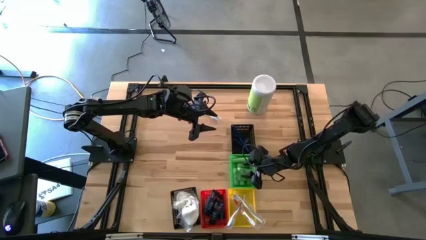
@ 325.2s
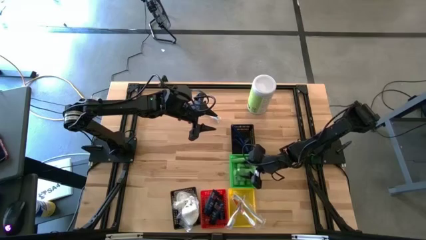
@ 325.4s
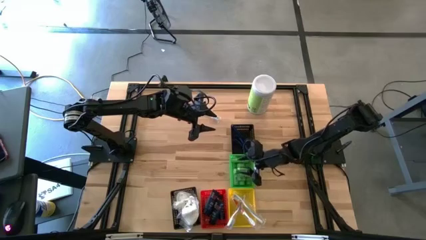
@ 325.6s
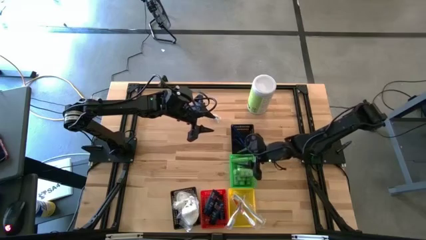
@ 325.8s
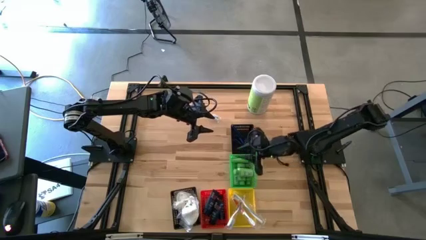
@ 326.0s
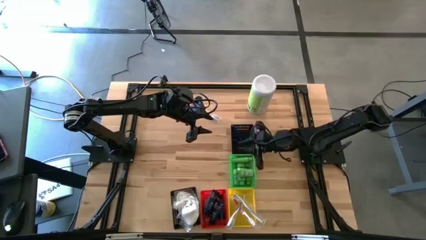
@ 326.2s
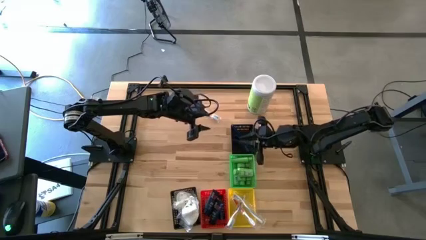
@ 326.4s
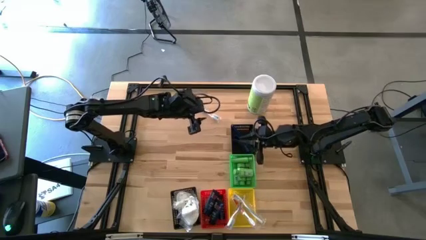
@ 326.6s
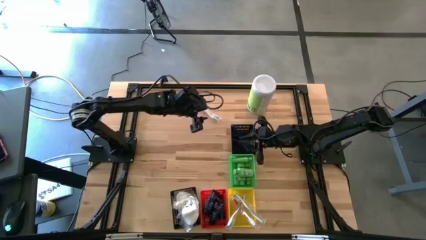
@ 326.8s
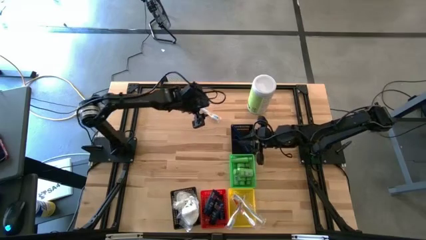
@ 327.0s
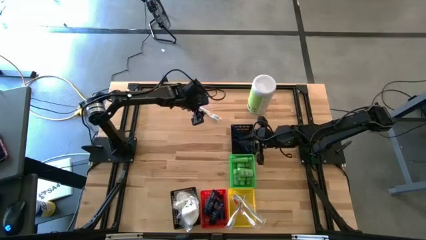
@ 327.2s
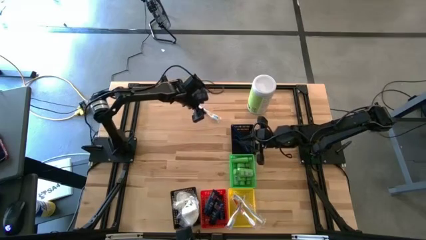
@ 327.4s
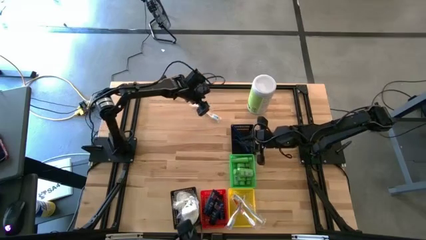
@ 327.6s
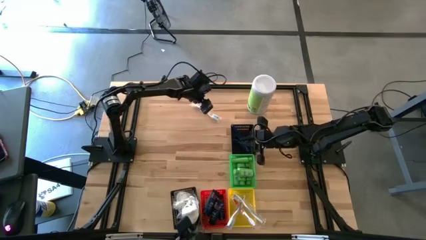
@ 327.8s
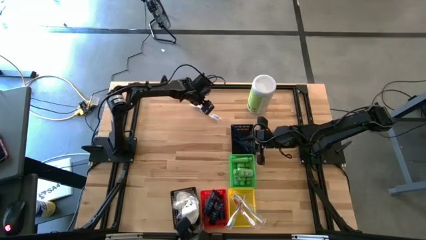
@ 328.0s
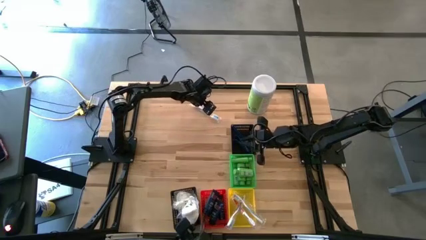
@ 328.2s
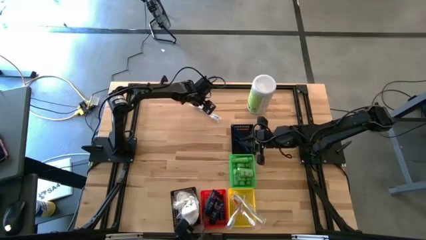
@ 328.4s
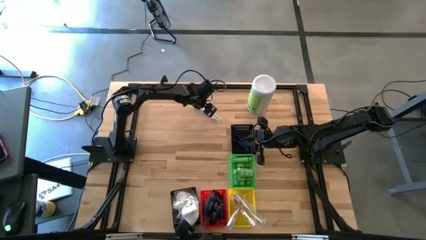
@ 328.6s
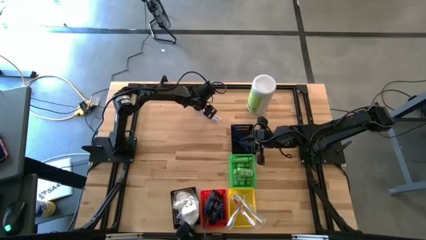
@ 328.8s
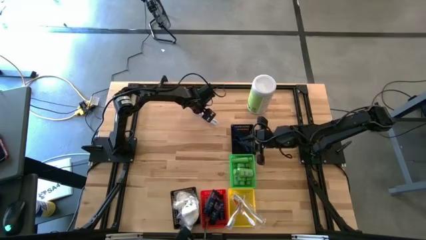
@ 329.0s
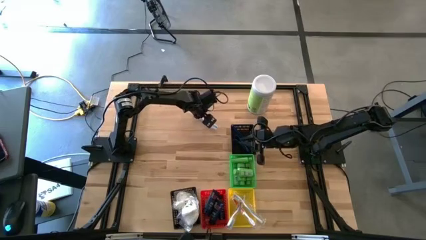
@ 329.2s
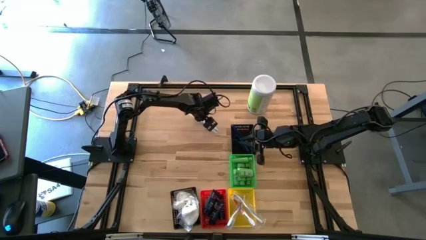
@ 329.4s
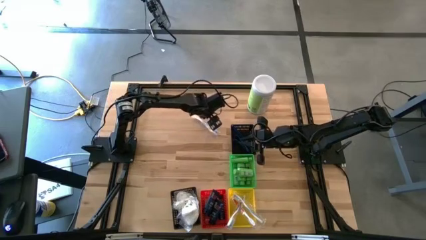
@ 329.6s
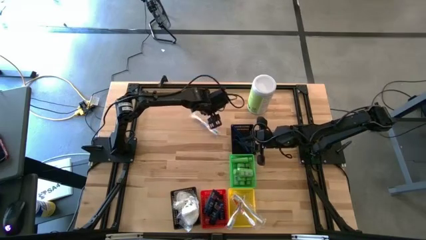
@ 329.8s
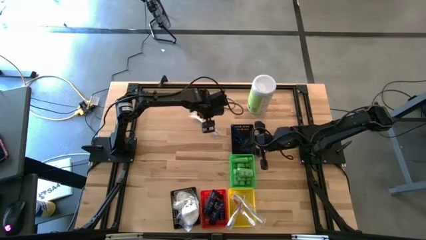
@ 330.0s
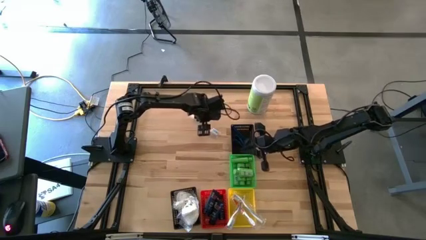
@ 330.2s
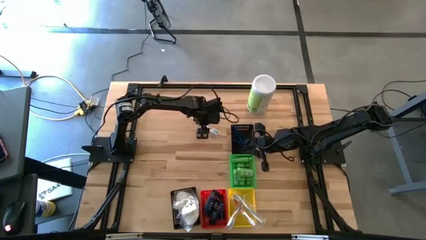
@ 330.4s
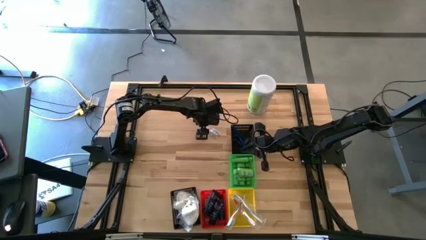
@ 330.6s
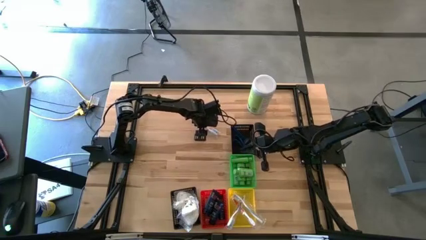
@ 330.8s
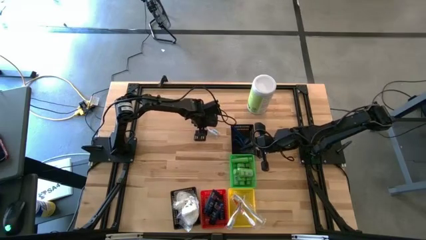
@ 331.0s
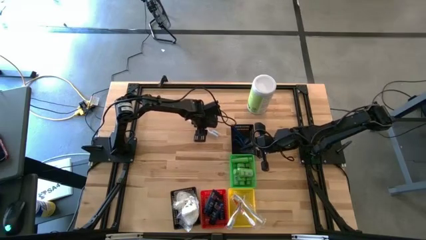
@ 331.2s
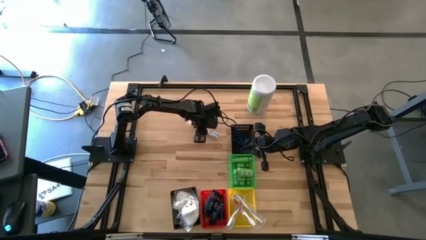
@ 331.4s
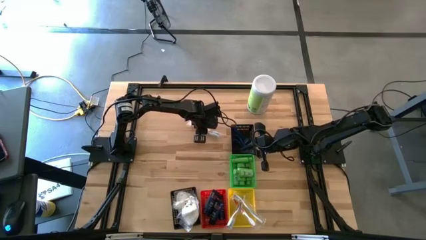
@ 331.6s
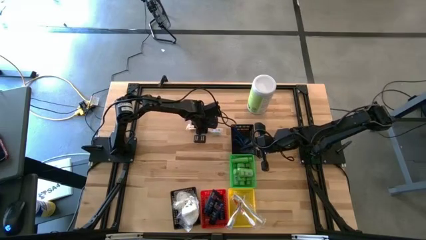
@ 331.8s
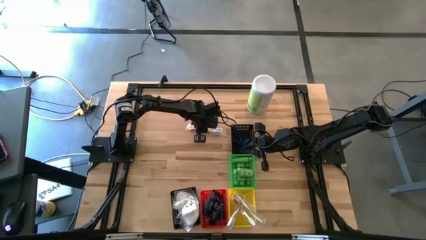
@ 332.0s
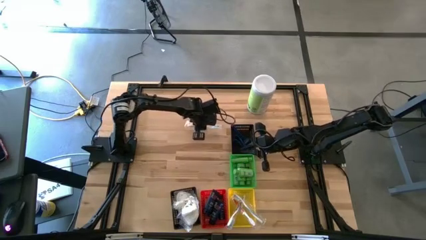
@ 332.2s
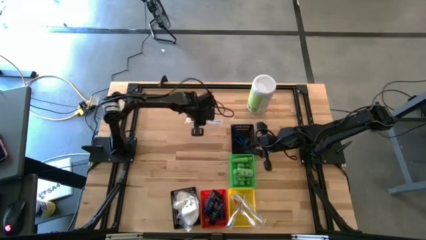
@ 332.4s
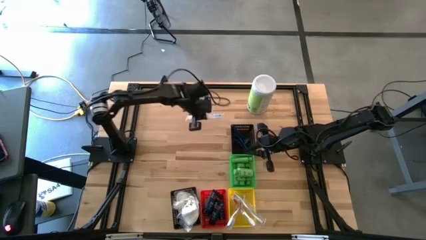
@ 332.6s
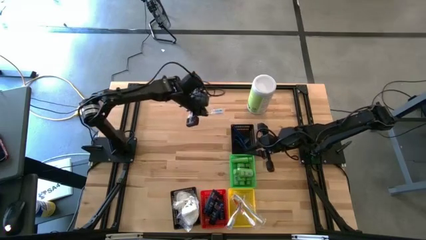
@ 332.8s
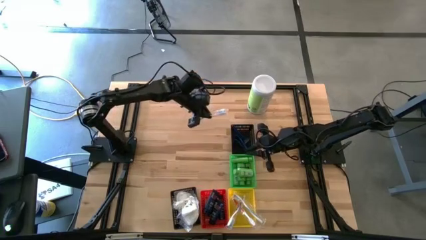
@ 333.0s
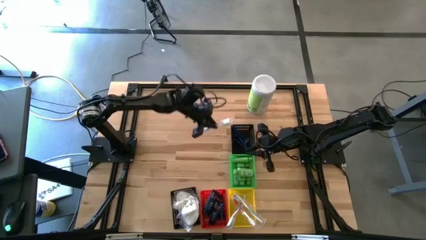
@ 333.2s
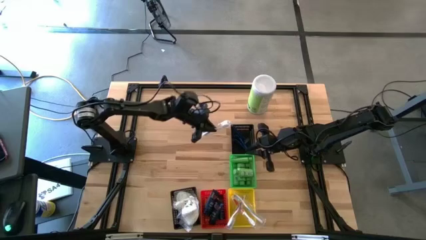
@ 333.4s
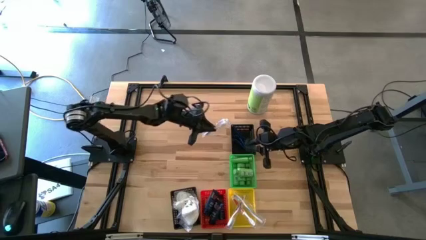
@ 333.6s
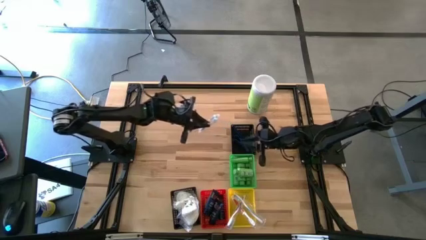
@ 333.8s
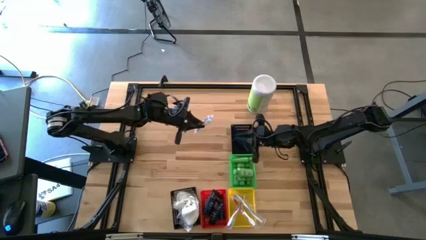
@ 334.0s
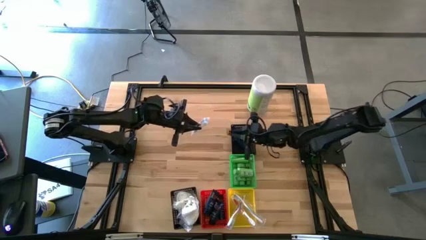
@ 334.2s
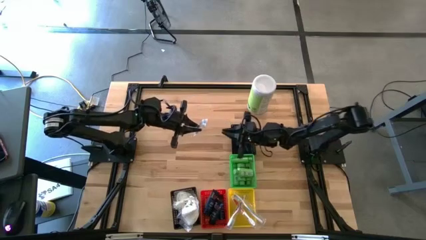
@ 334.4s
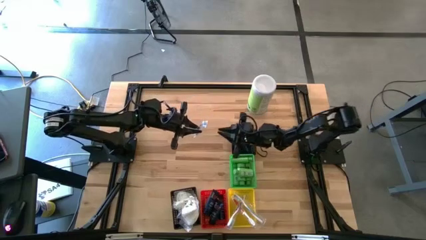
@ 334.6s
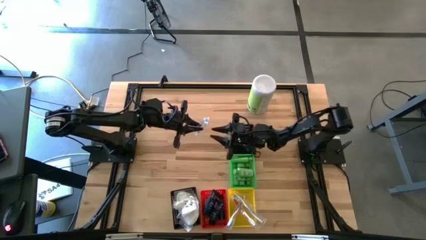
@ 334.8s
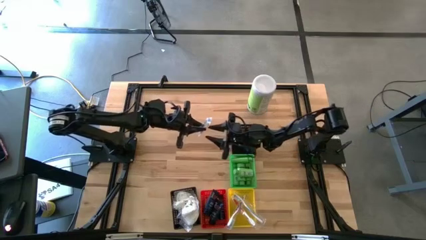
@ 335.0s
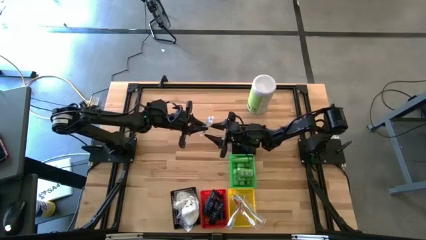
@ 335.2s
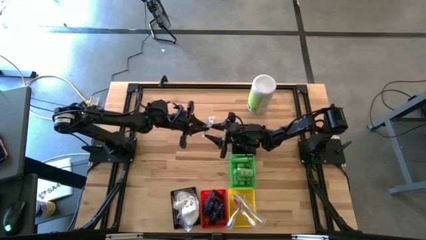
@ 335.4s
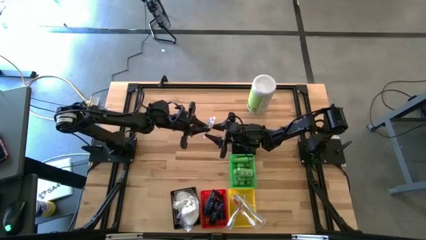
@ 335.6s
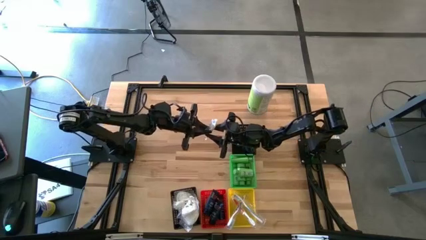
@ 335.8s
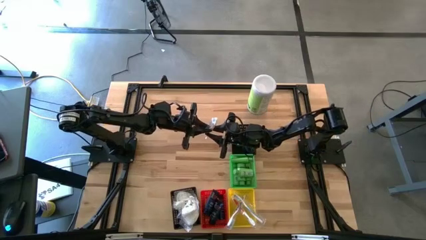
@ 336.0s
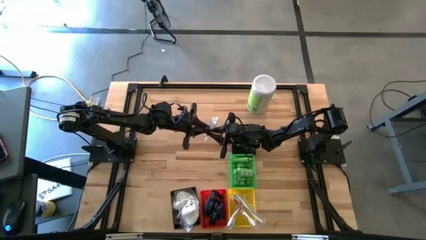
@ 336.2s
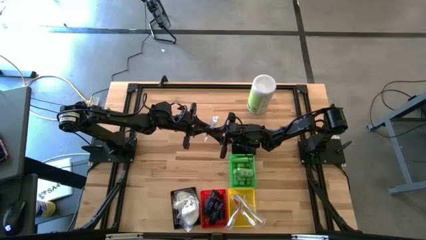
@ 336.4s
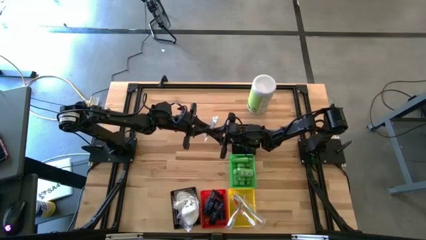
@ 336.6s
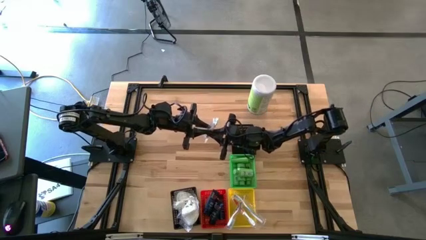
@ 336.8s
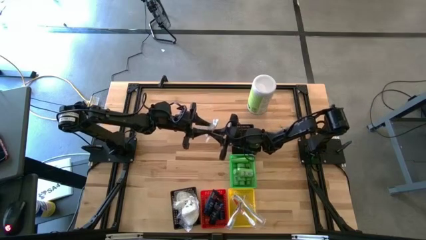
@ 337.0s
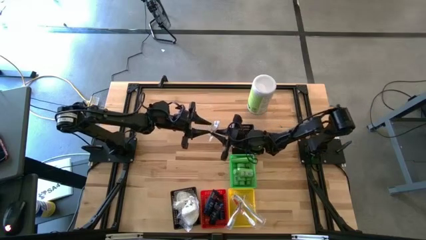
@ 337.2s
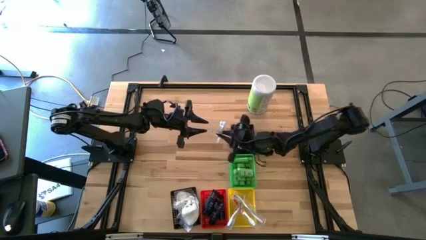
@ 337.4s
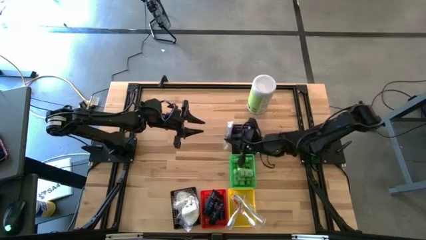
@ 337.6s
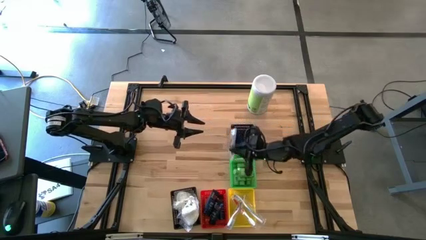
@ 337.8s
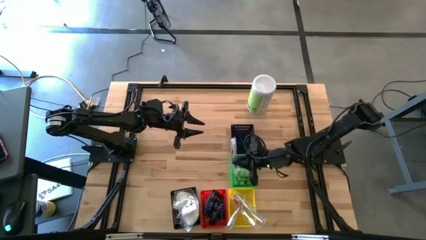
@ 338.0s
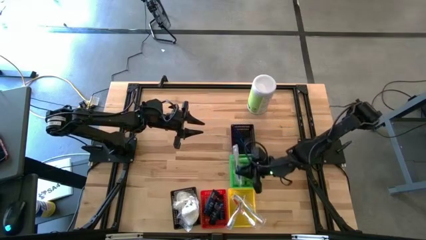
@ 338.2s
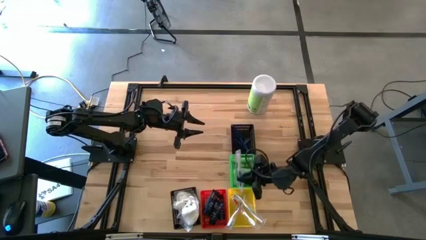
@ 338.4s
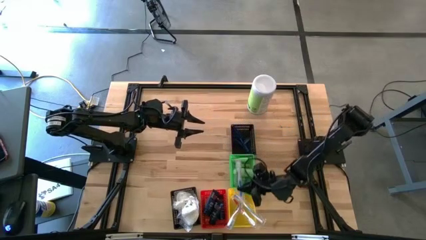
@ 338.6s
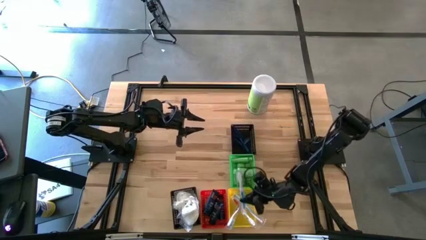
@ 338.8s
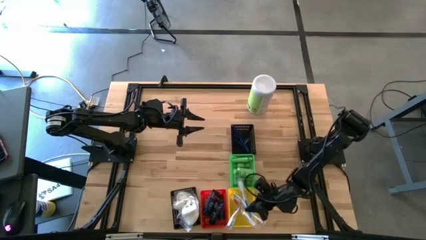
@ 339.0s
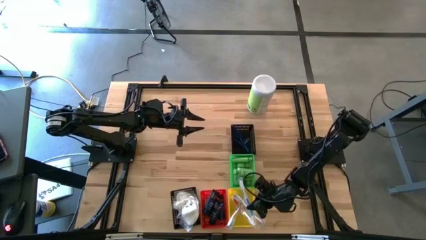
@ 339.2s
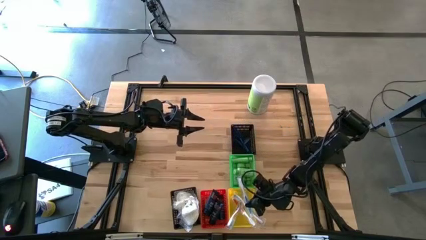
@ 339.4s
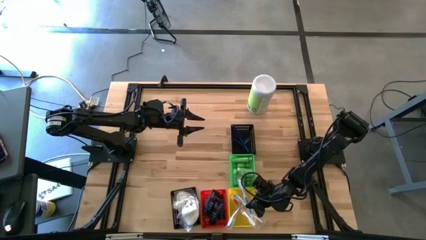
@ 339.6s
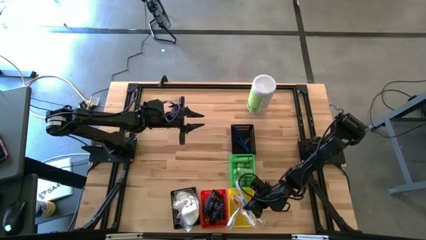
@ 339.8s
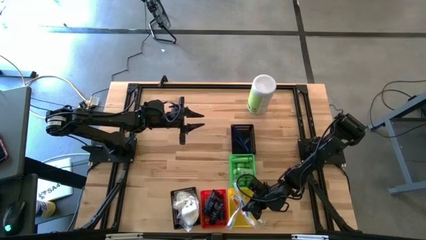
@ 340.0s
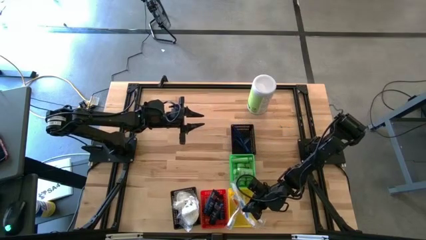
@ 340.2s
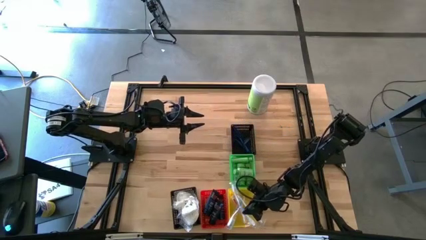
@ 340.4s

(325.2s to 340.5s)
Task: Pick & Place Travel size toiletries
Put the blue toothbrush into the yellow bin

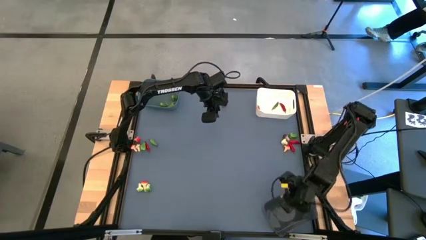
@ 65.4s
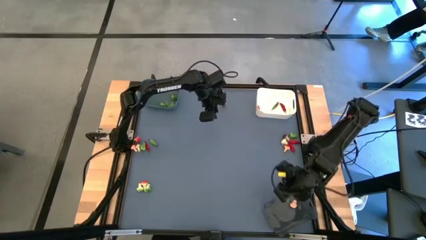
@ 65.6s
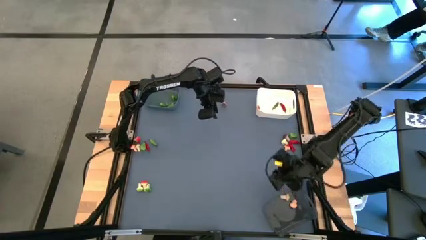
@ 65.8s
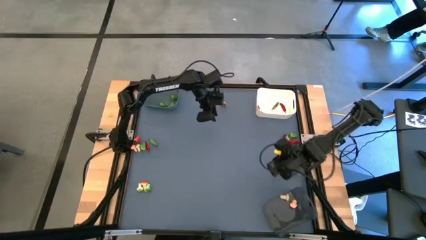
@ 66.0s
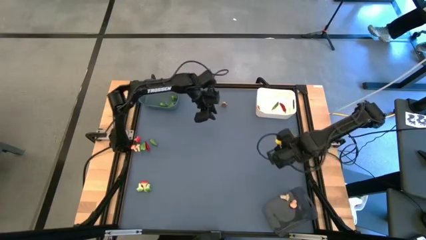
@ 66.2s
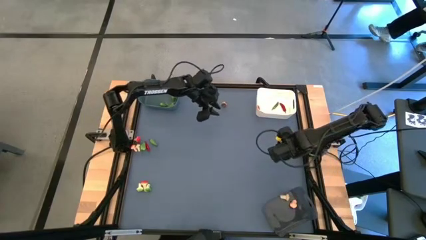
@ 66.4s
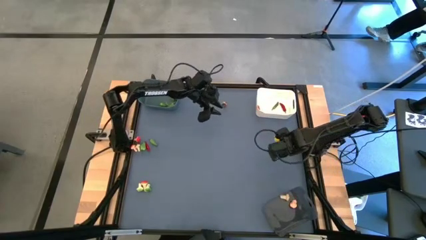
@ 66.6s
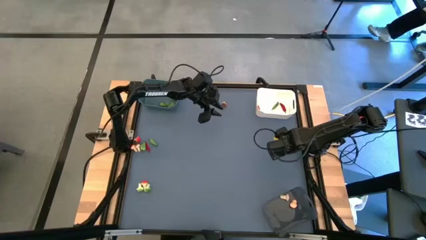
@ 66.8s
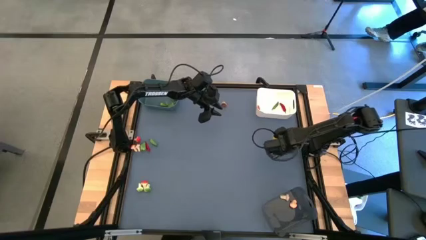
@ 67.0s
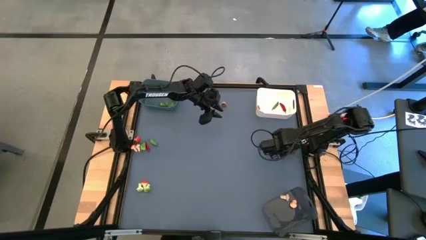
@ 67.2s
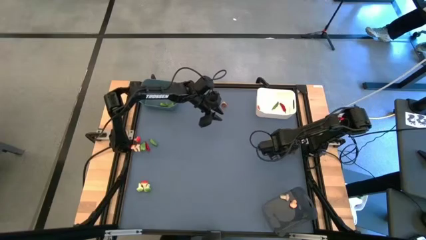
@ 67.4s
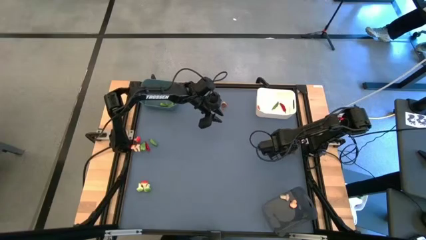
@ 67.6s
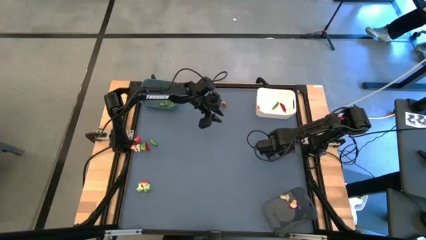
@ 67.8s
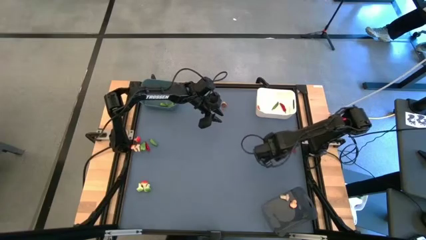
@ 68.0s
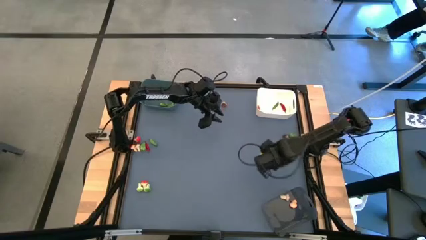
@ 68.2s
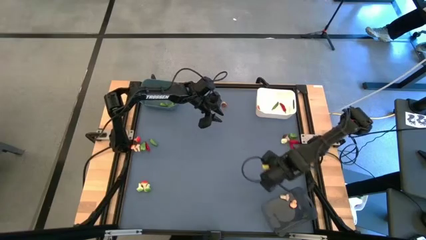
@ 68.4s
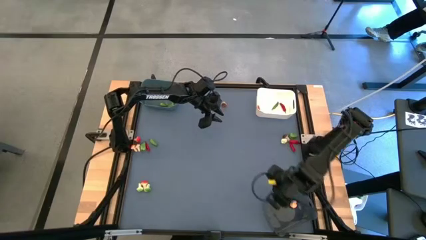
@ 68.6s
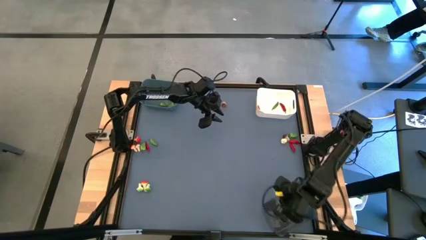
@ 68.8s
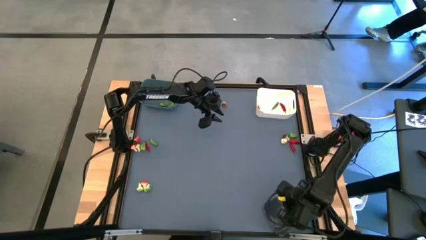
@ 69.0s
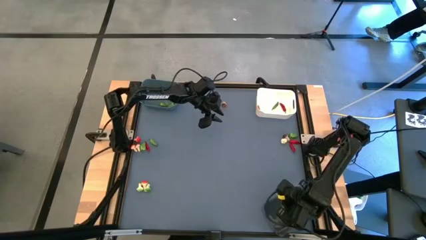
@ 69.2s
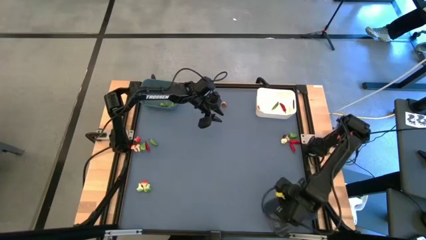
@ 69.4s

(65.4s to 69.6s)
Task: Sort produce into baskets
Put the brown mushroom into the black bin
